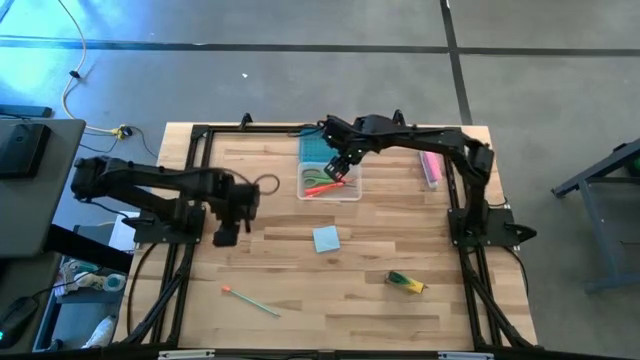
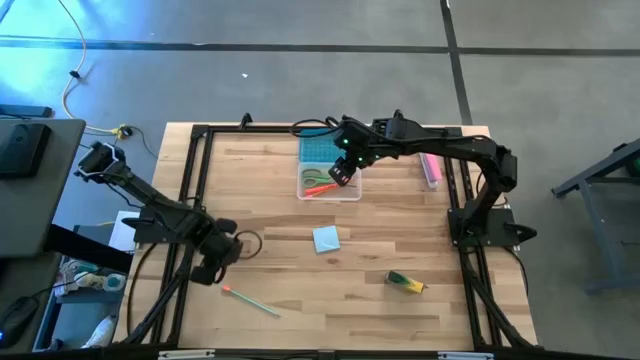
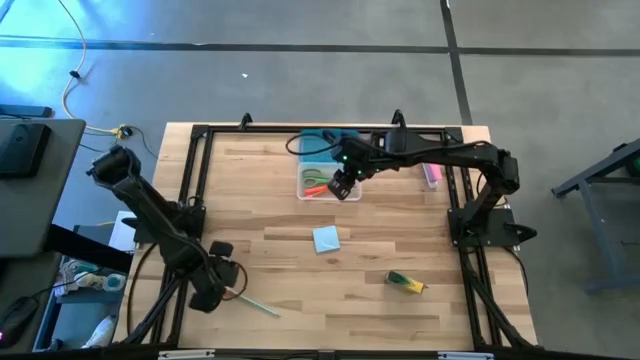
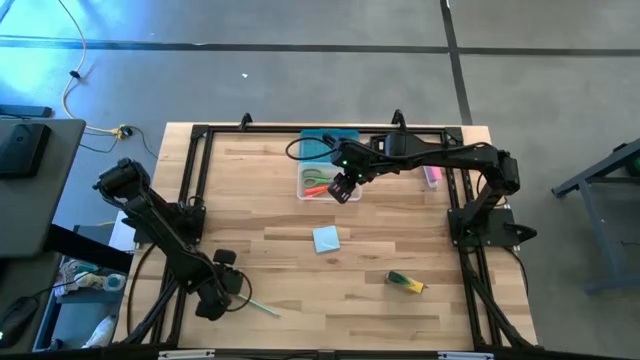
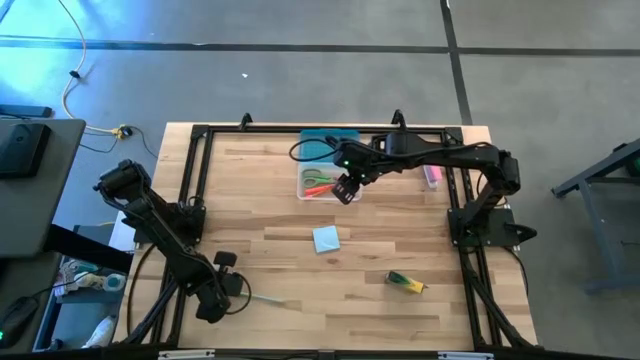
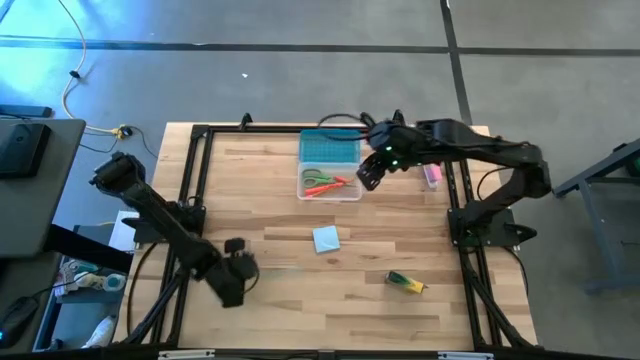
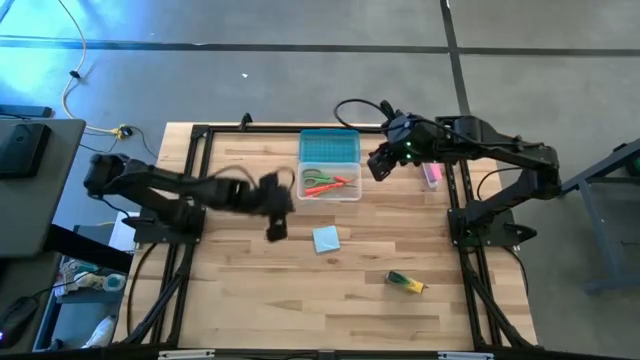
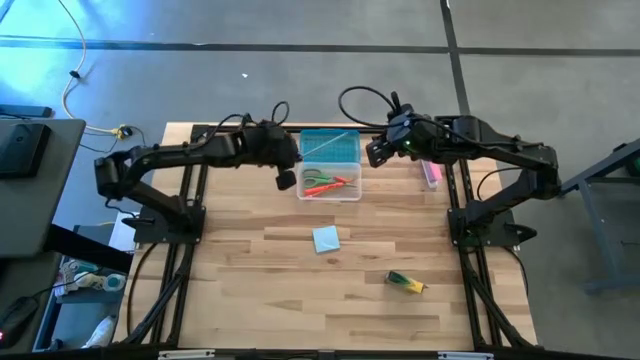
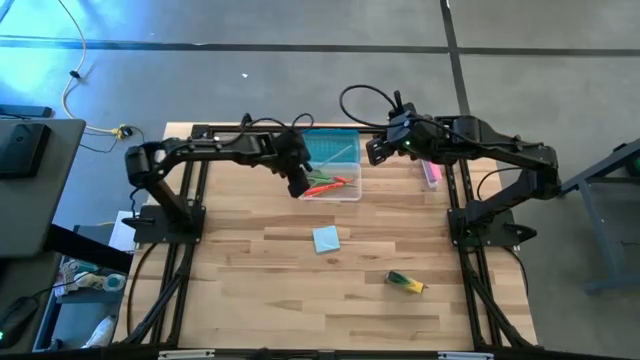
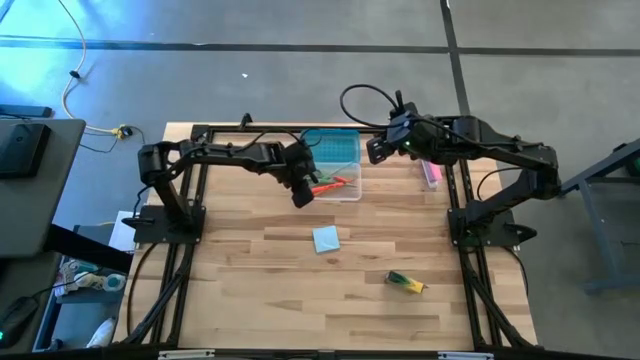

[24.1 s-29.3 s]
Task: Pack school essentials
Put the blue pencil into the supply box

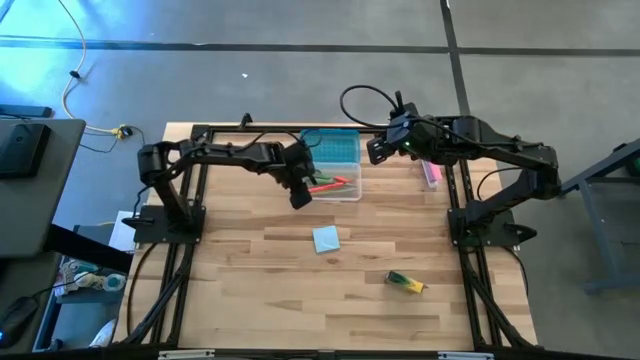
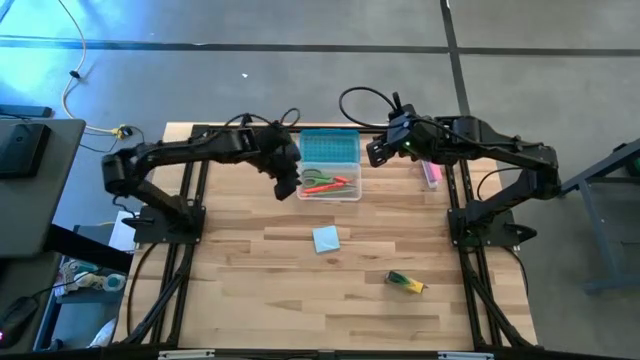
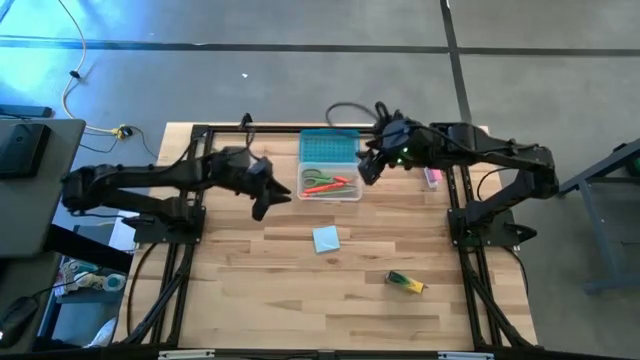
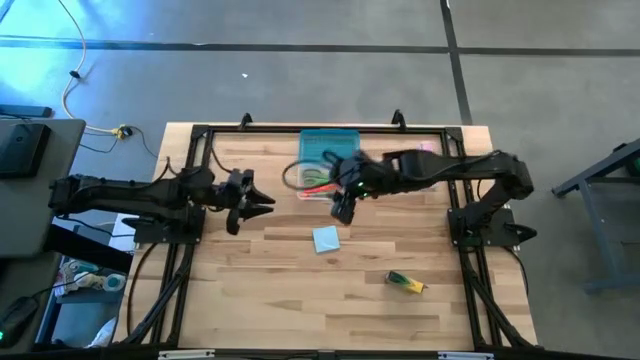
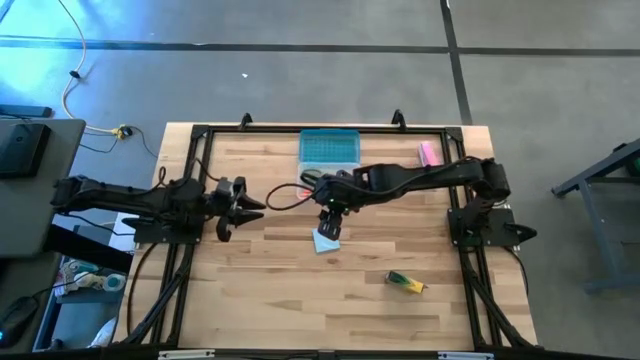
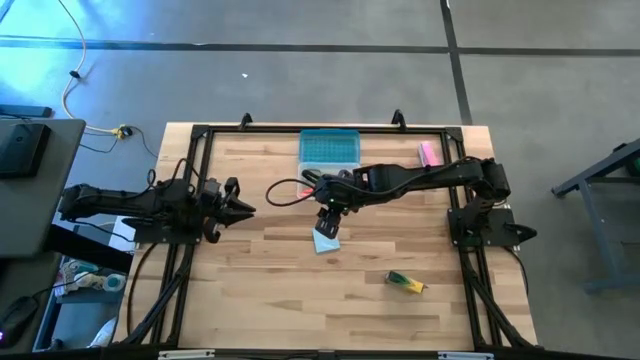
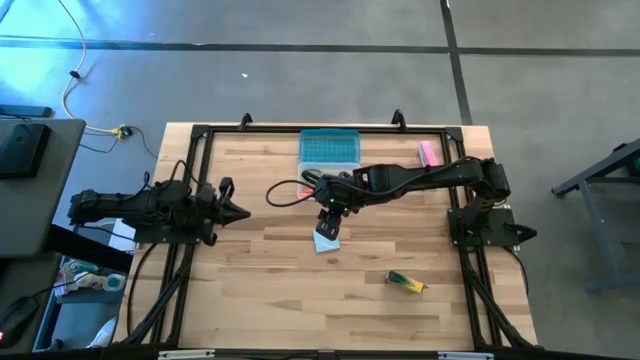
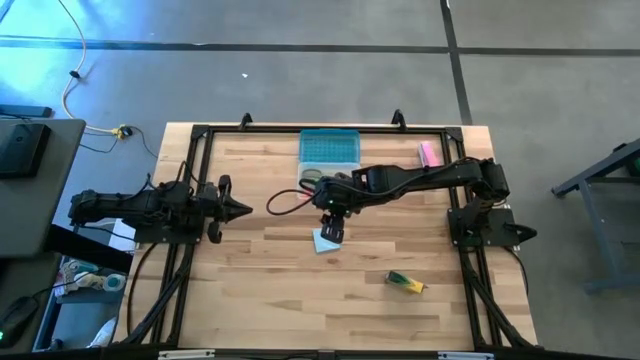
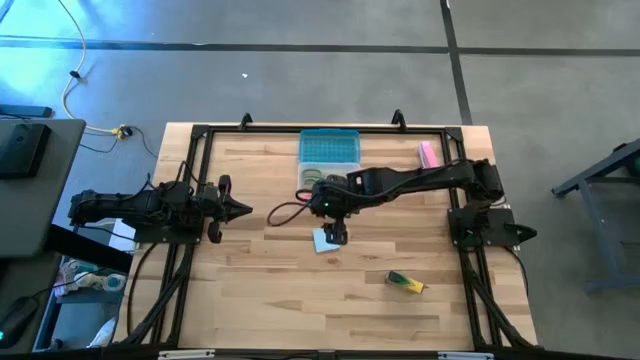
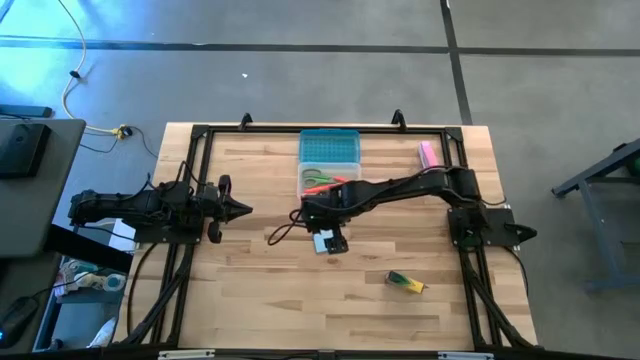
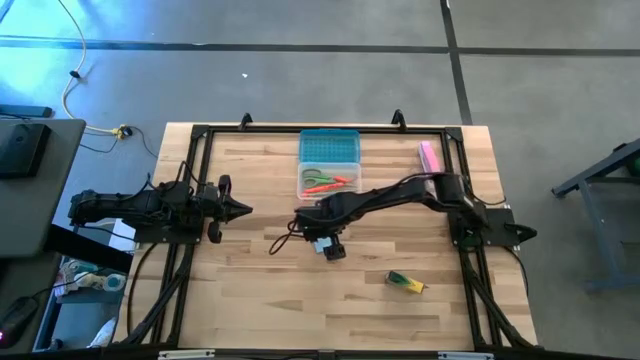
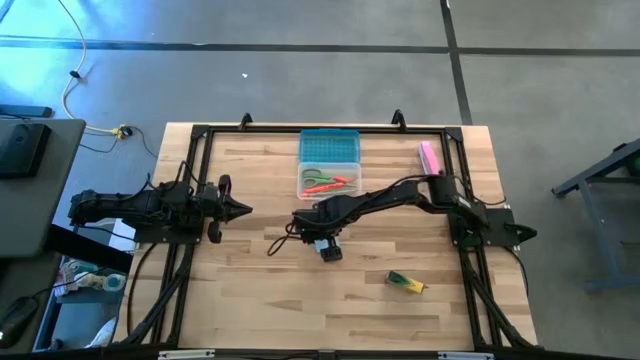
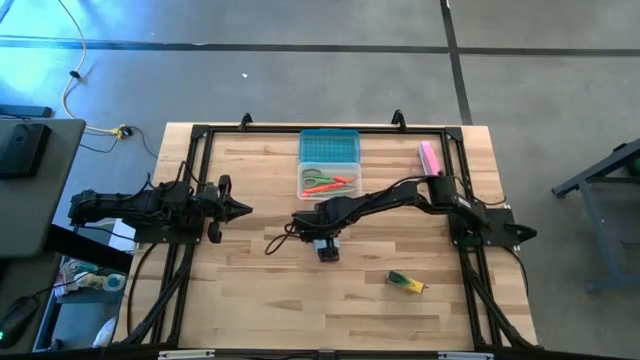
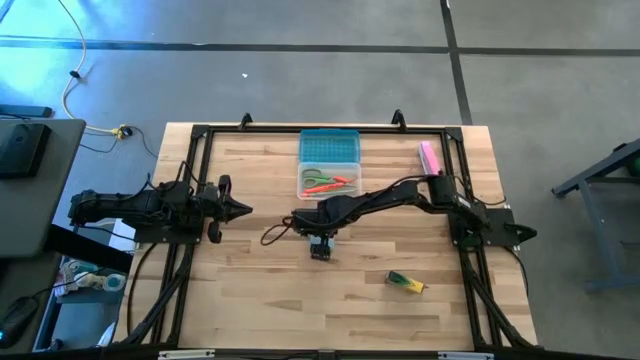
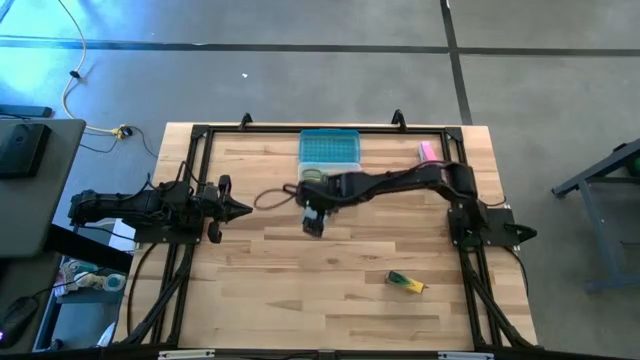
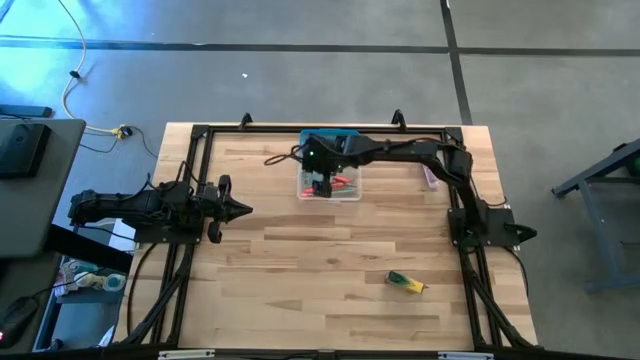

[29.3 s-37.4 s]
Put the blue sticky note into the supply box

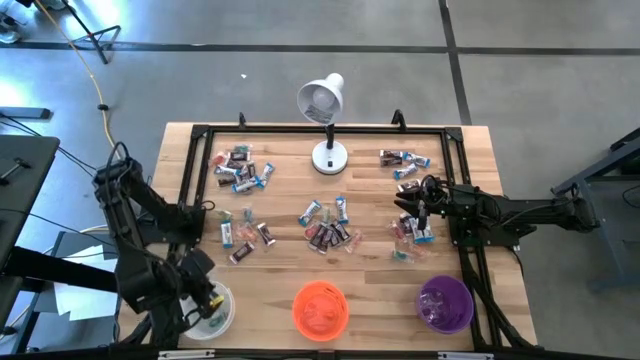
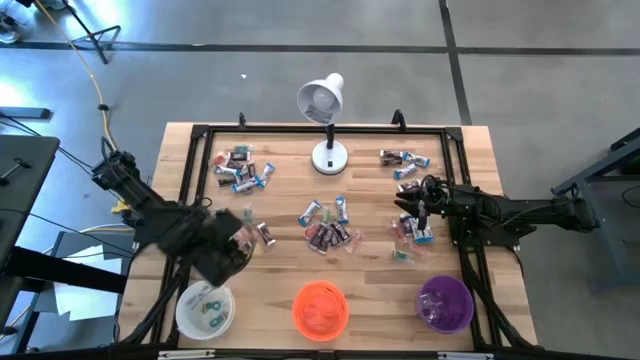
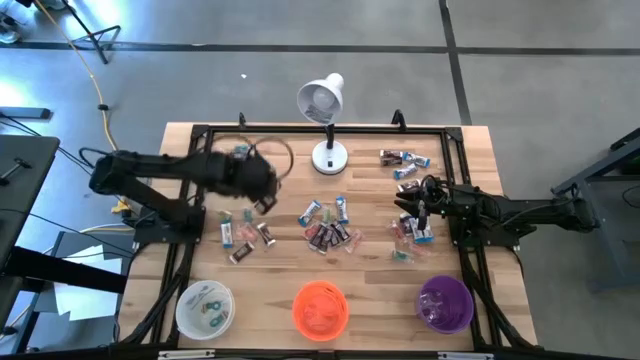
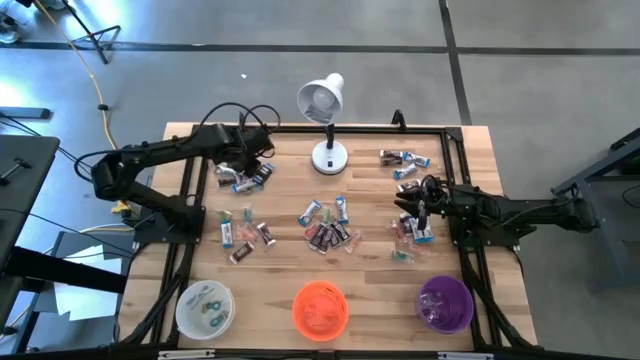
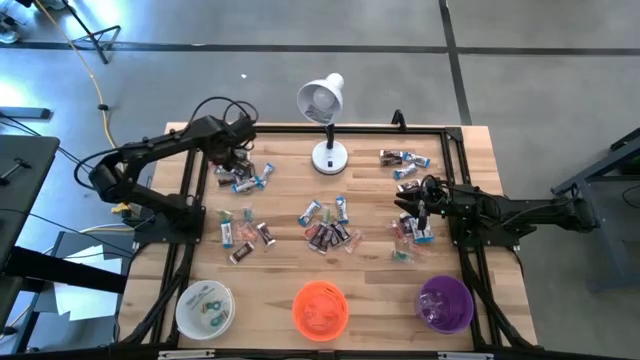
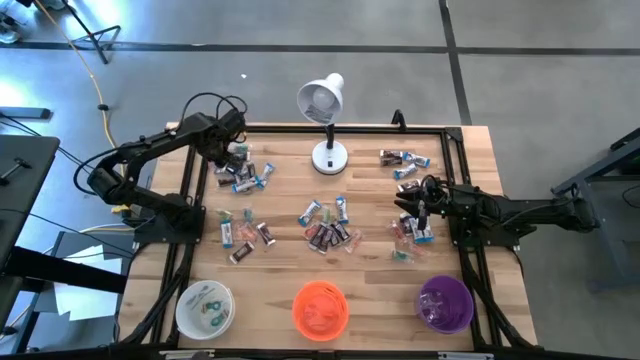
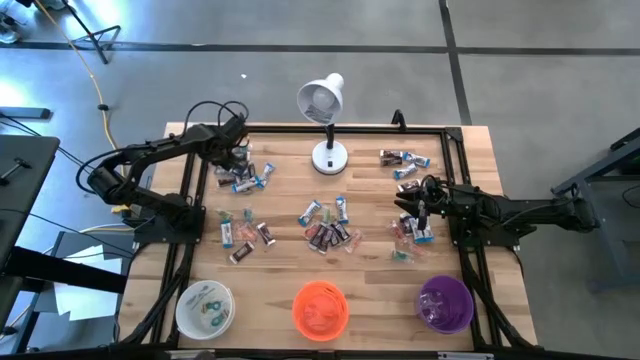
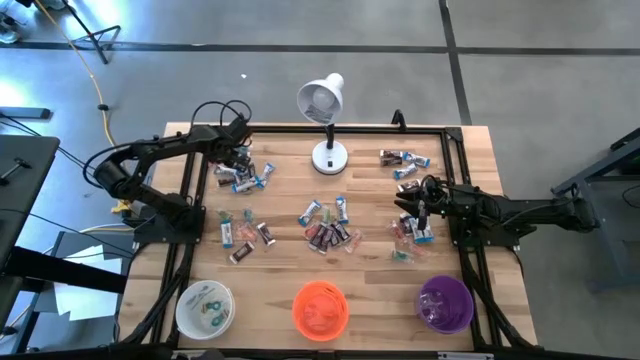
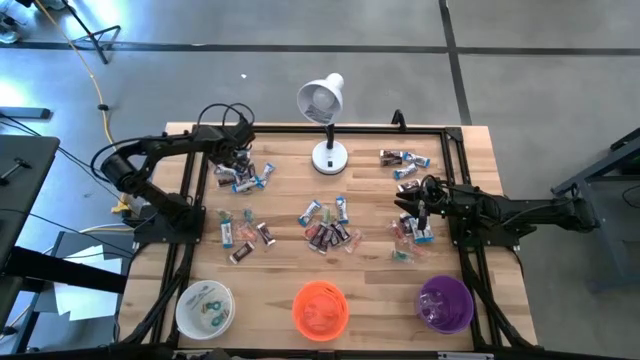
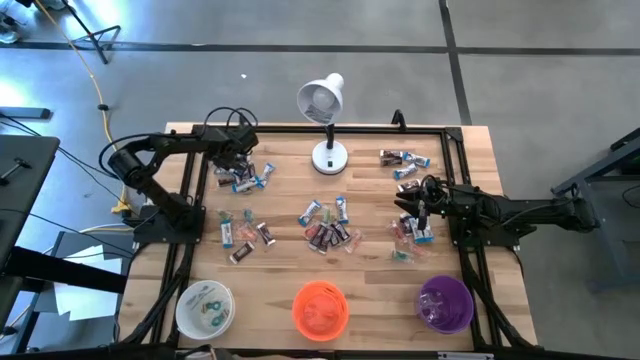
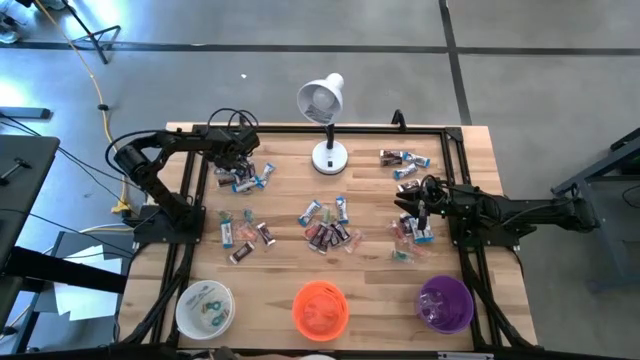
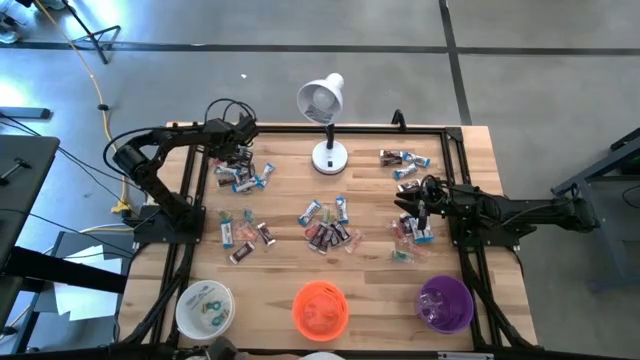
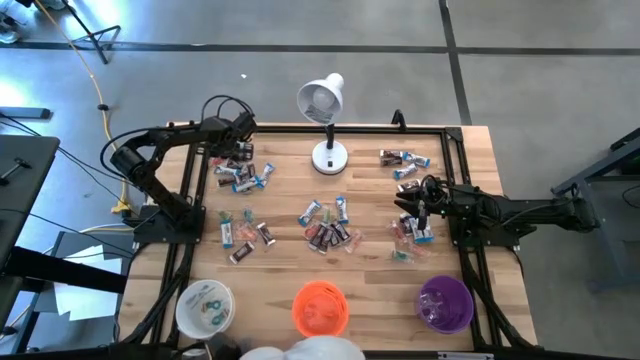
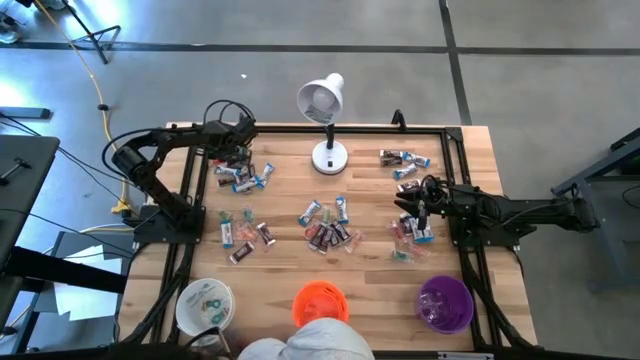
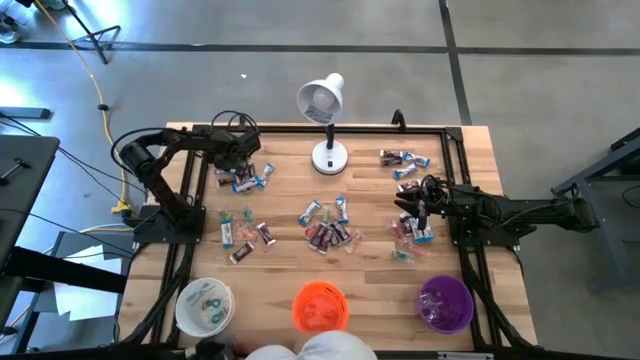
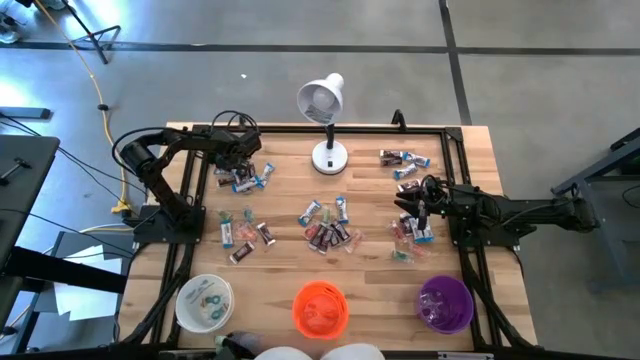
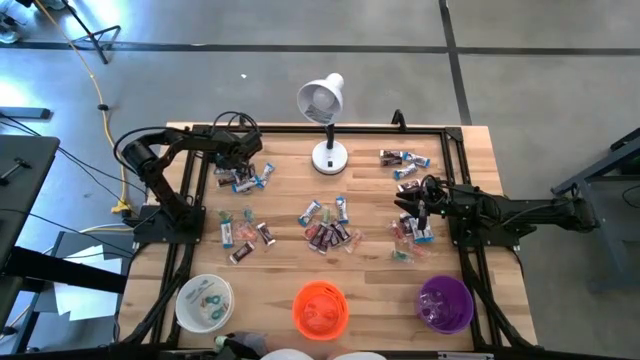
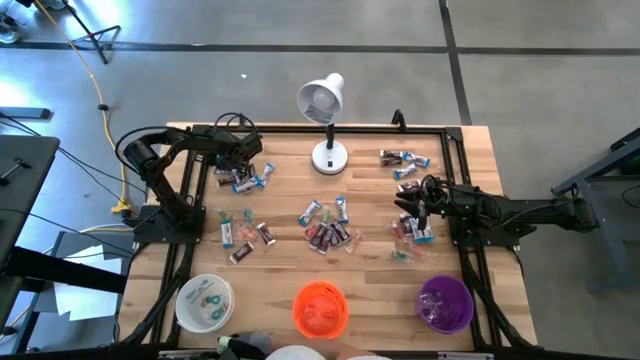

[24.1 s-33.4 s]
Task: Organize candy in baskets
Put the red gummy into the white bucket
